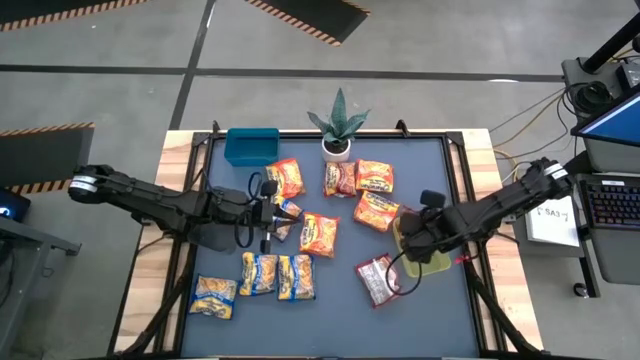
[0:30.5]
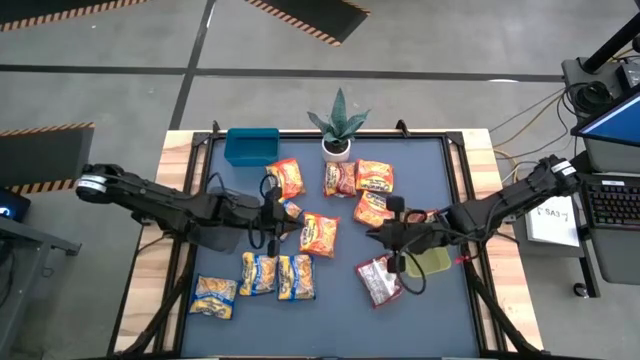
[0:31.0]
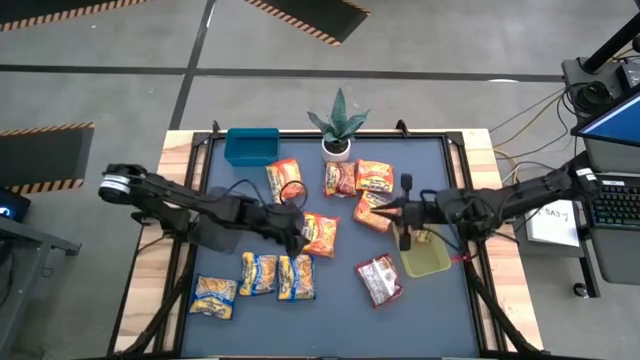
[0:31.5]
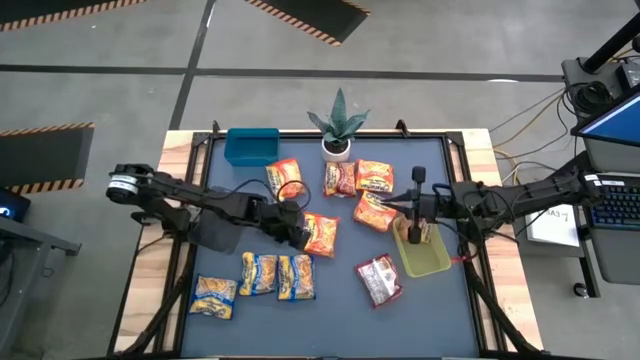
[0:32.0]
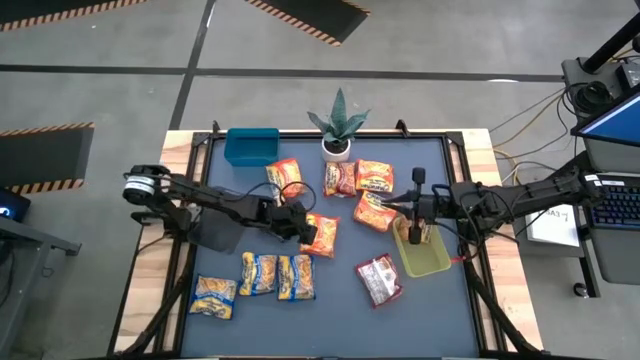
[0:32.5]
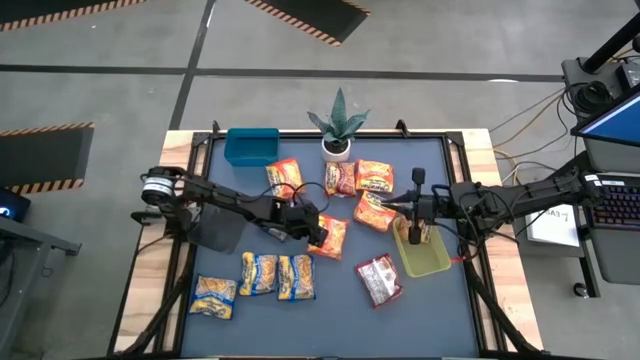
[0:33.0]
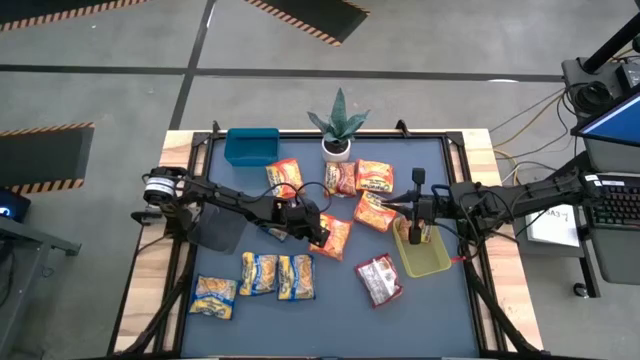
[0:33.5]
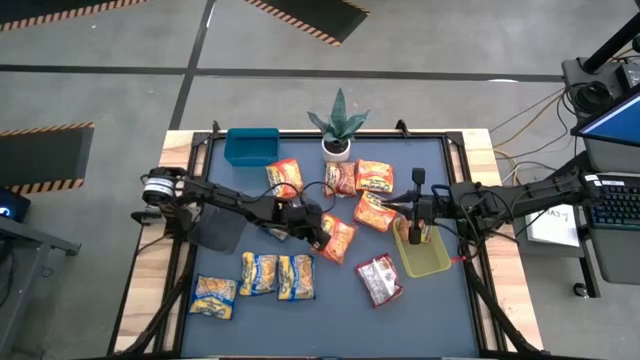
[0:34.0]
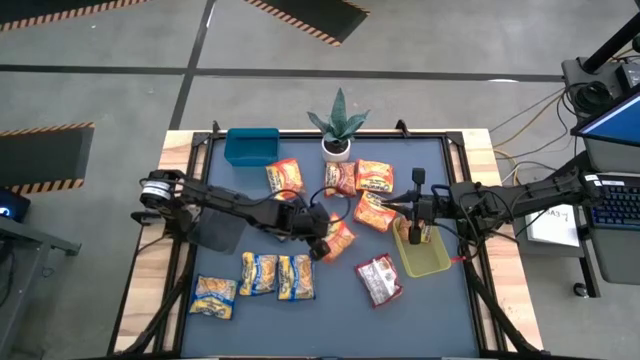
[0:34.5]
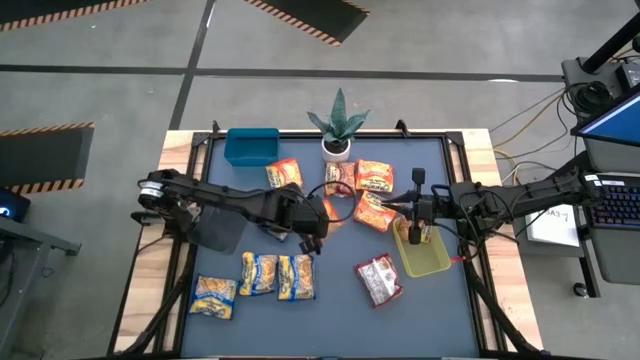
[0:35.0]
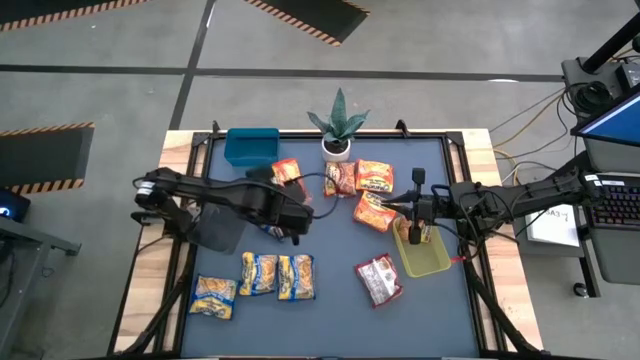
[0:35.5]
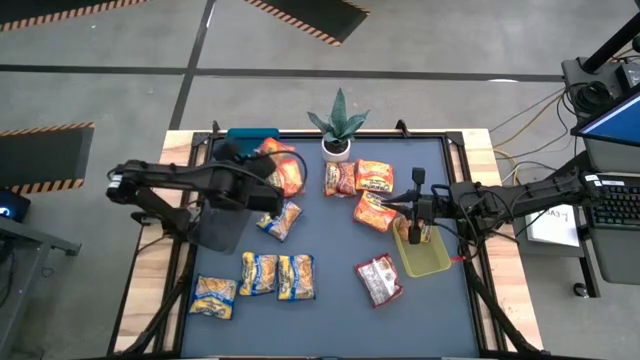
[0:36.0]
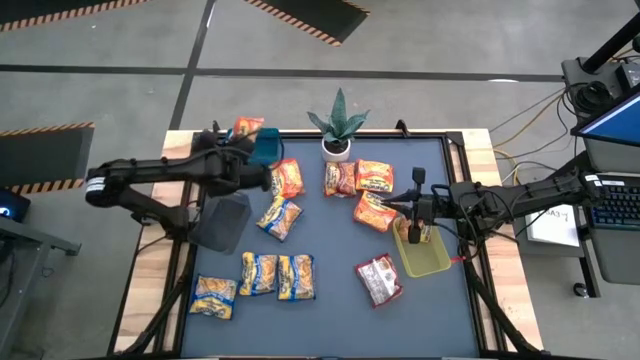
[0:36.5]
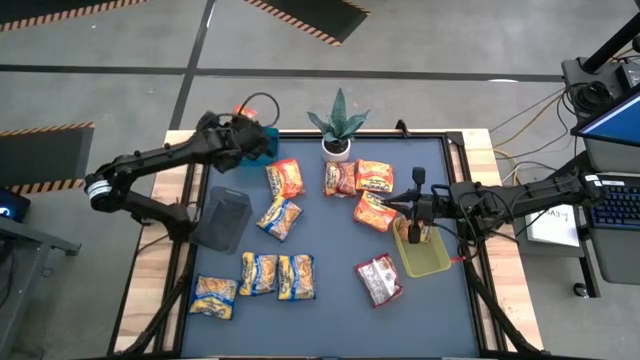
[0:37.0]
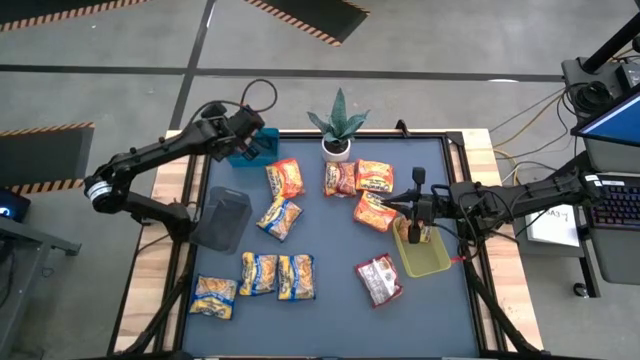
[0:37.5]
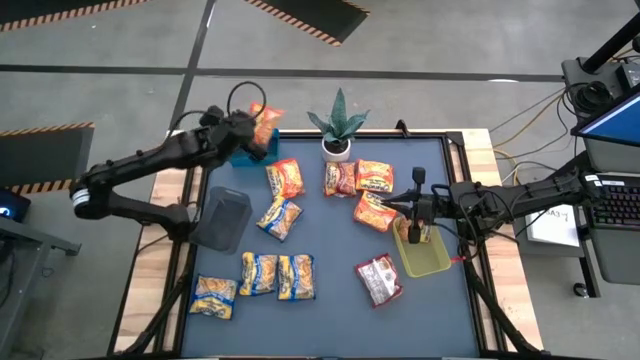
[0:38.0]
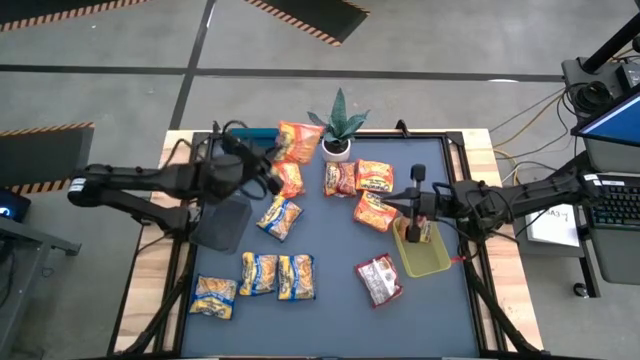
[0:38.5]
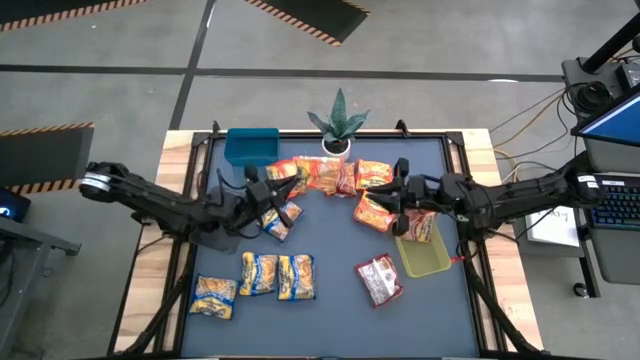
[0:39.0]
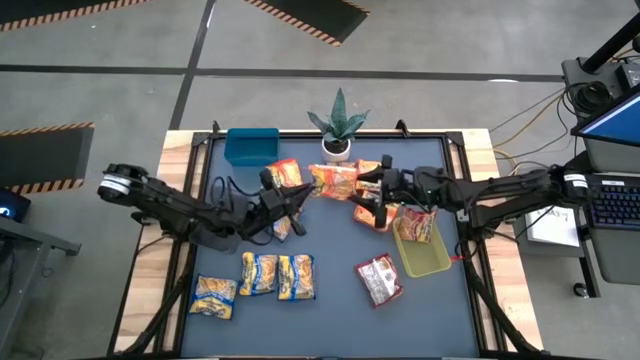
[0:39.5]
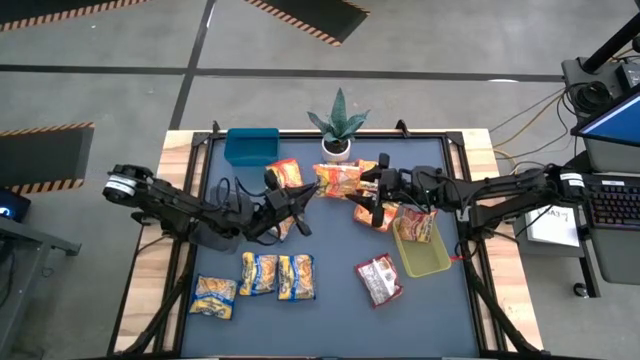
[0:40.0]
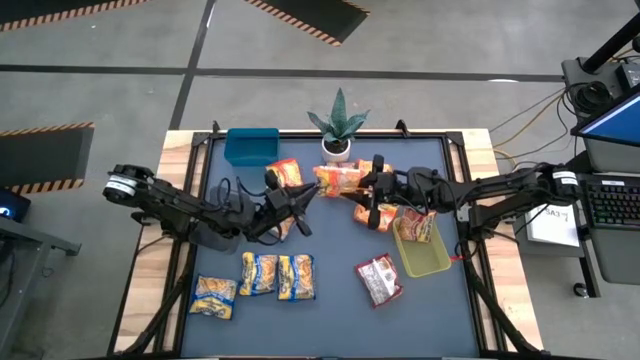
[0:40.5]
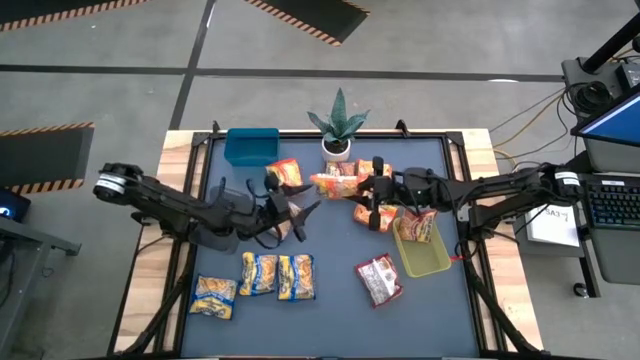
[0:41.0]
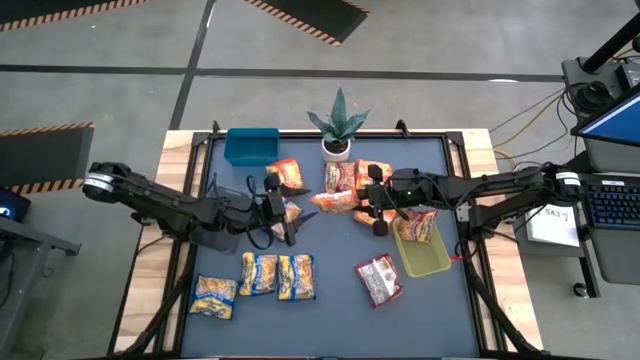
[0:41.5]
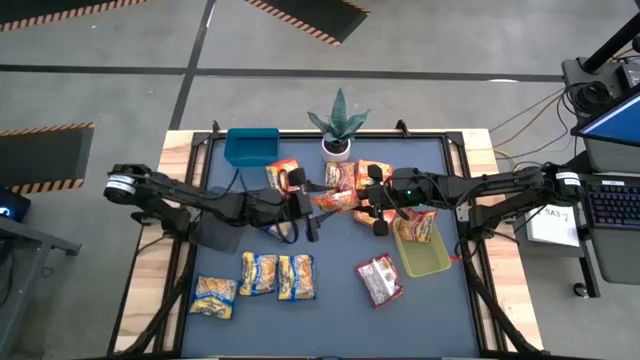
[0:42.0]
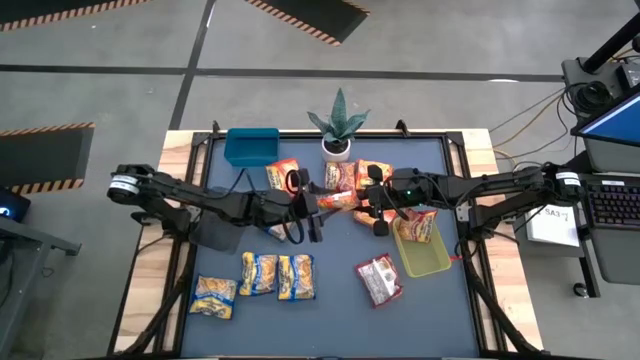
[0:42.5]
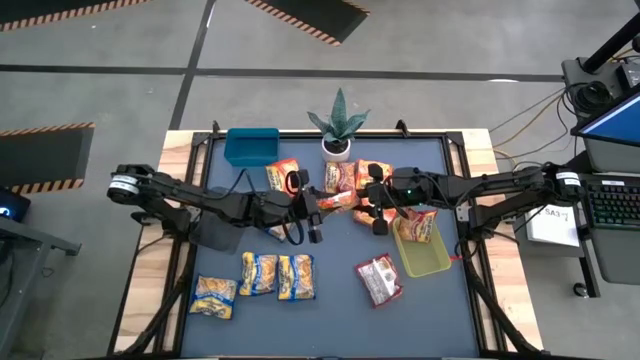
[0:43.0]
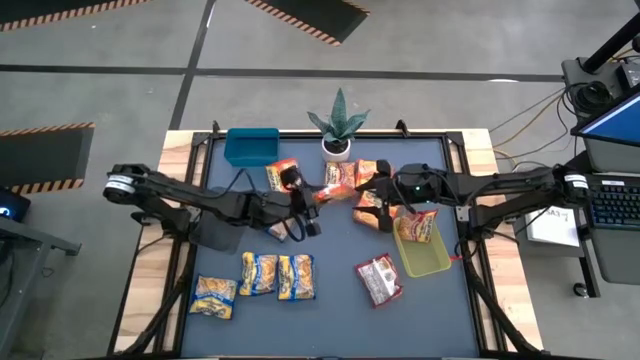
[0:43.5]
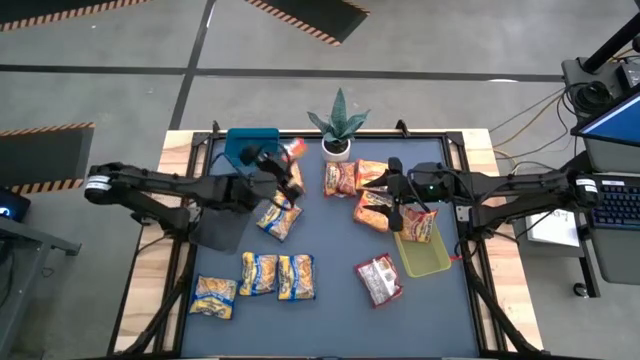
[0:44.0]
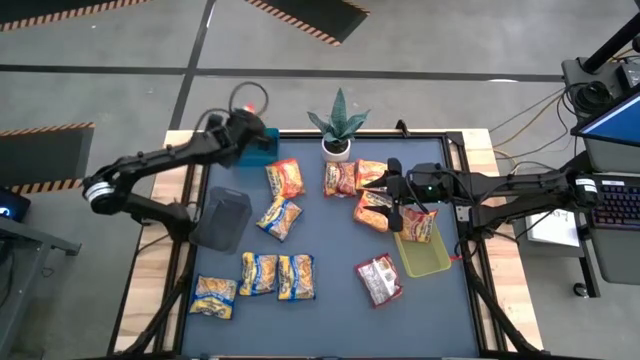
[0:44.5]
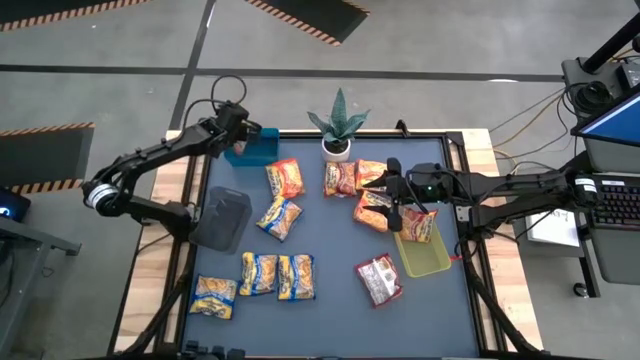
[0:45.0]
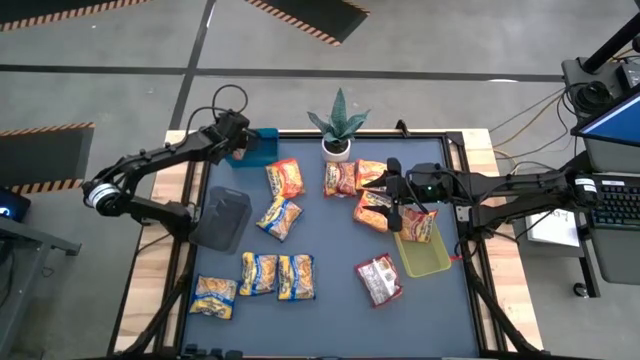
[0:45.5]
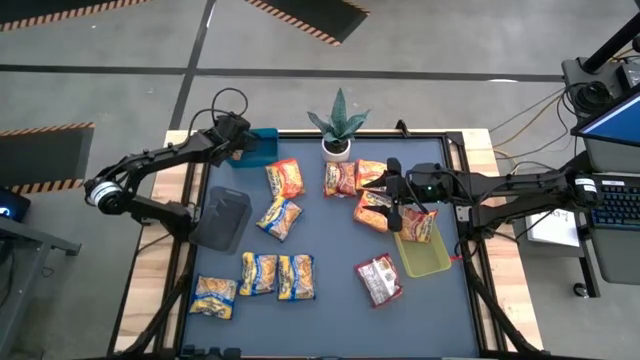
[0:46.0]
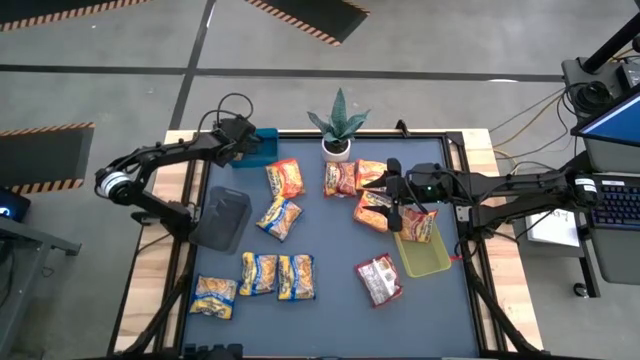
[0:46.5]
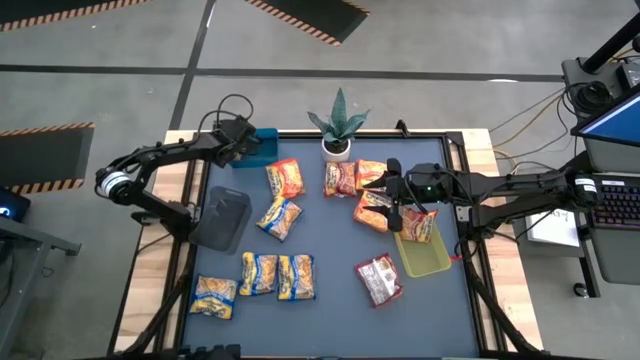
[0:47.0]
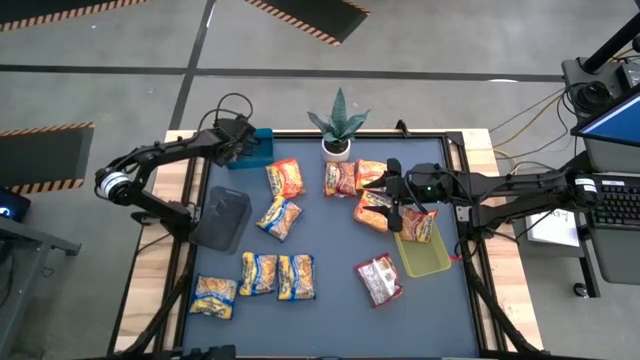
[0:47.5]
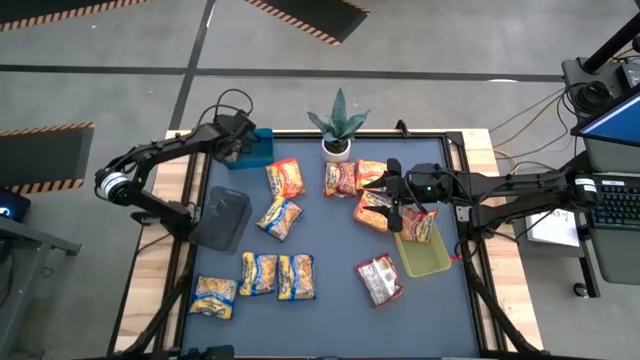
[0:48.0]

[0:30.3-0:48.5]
Task: Sort Maruchan noodles
Put the orange noodle pack into the blue bin

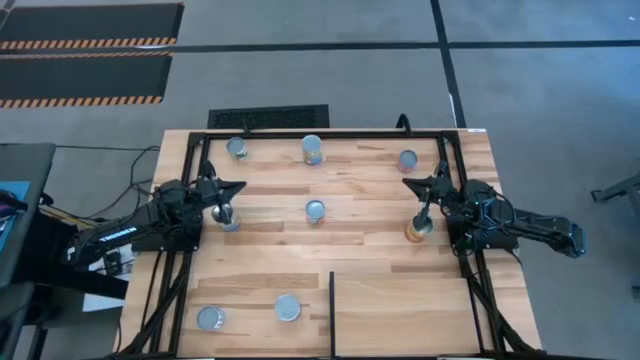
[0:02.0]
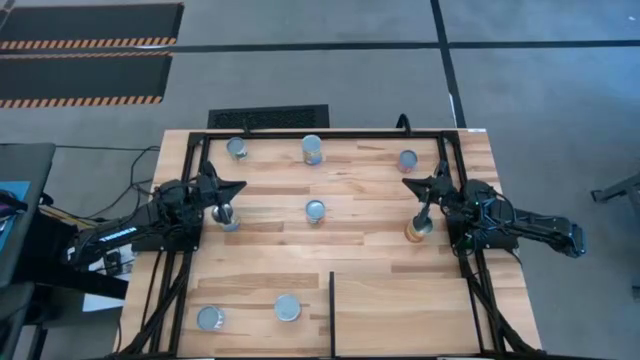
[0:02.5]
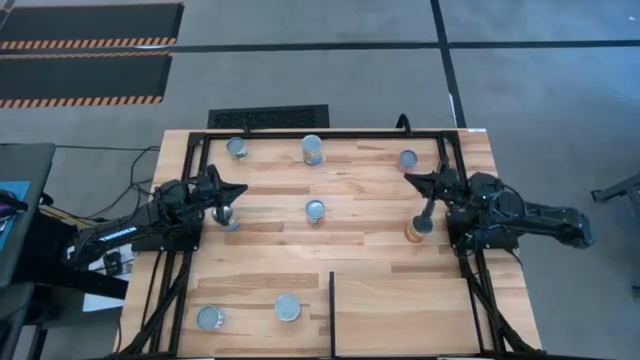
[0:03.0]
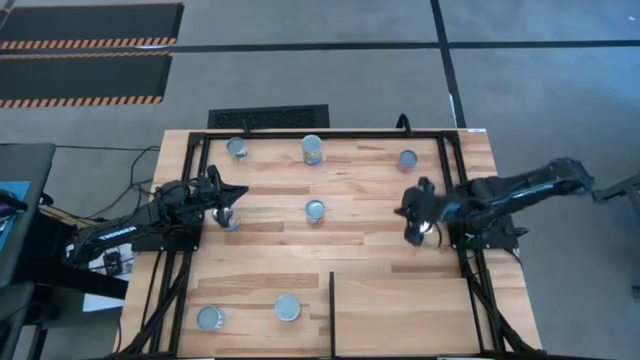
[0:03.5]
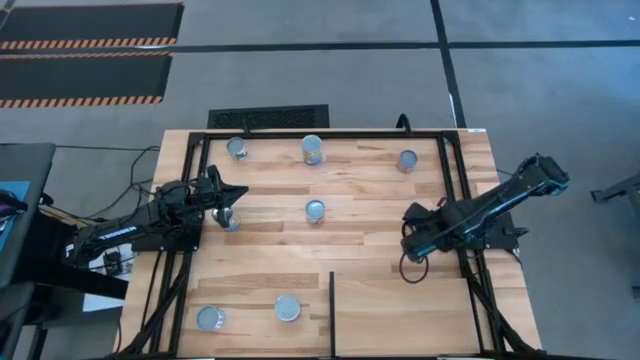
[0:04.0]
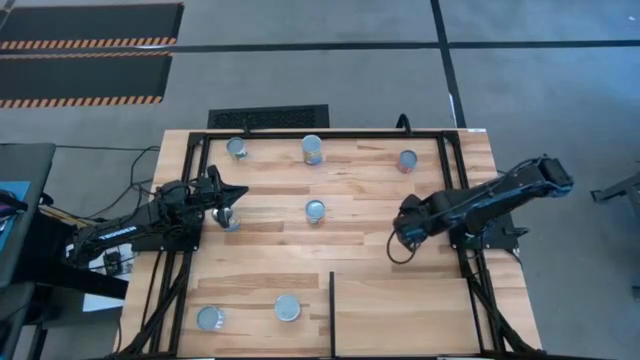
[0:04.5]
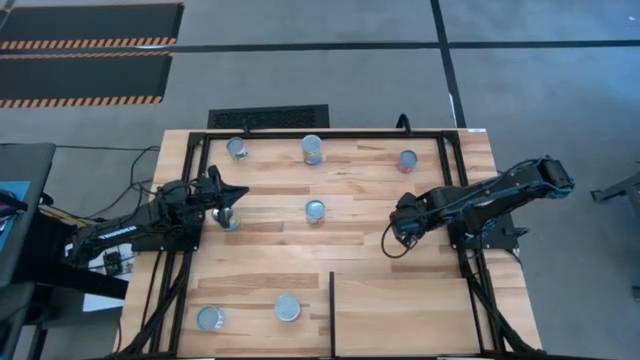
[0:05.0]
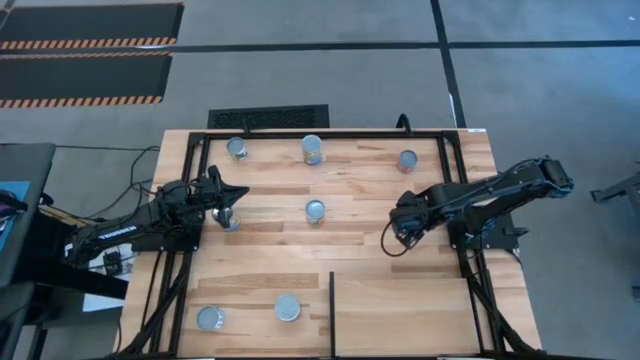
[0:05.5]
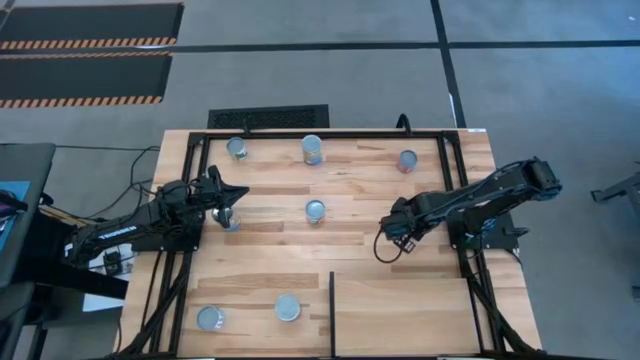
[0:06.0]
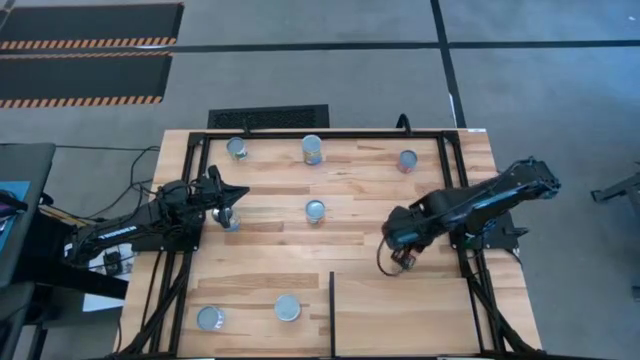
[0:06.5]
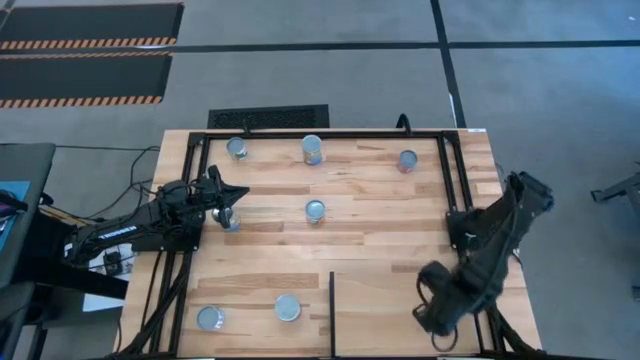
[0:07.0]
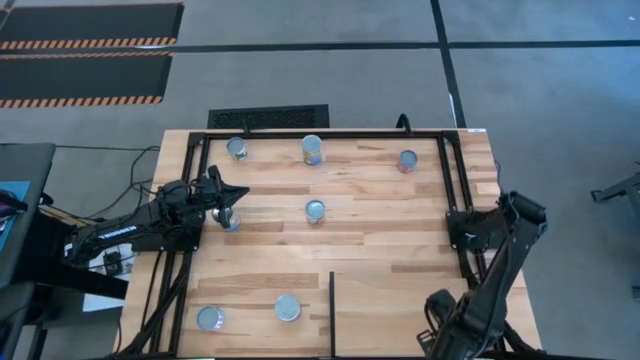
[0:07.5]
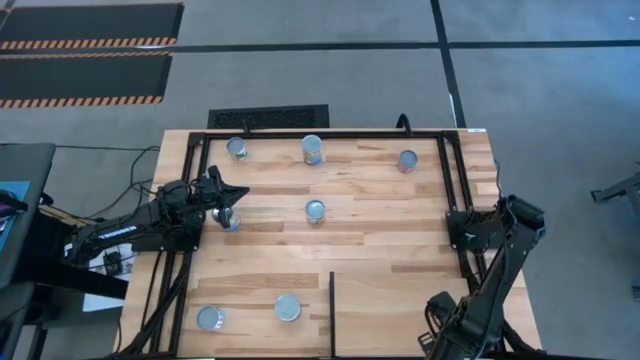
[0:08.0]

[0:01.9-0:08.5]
Task: Pick and place cans onto a shelf
Put the top canned corns on the shelf
